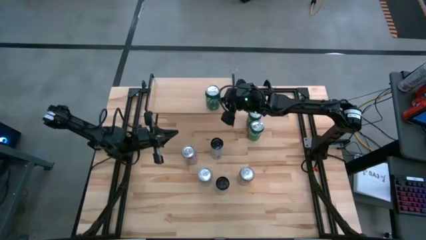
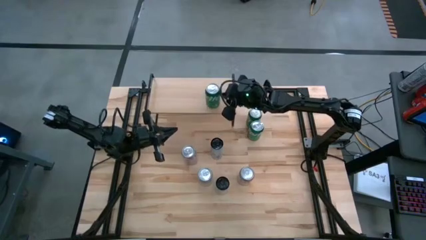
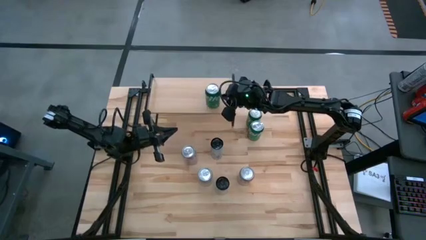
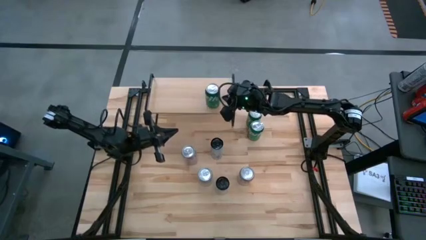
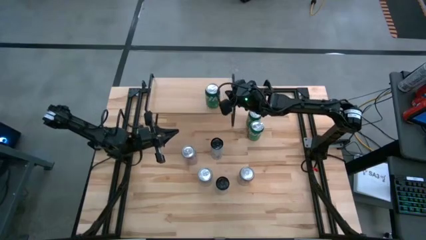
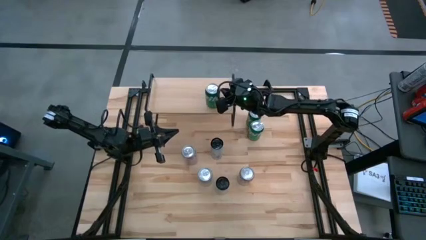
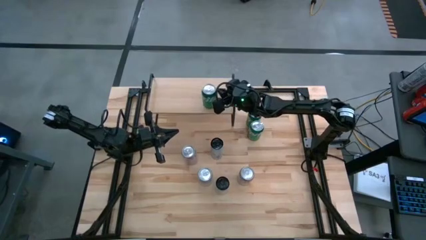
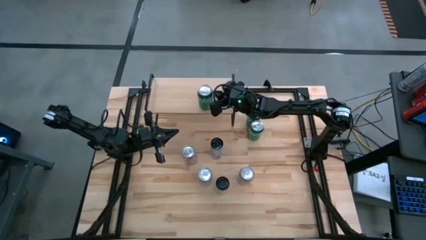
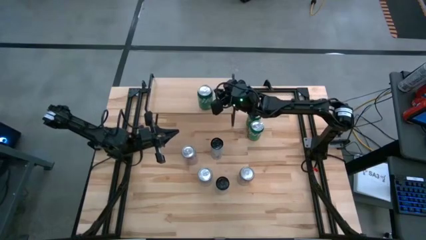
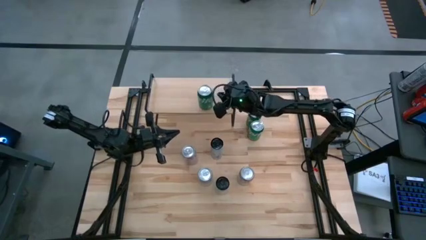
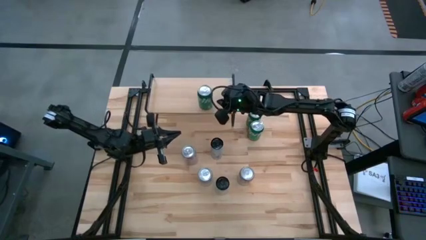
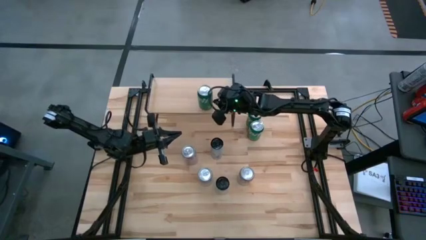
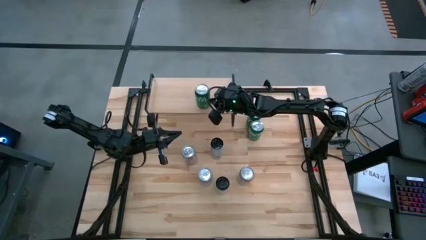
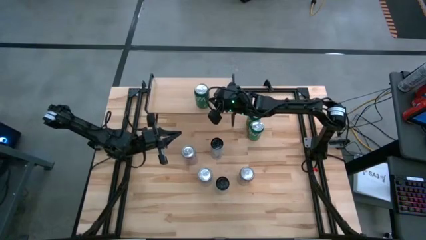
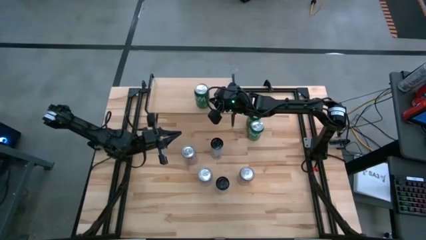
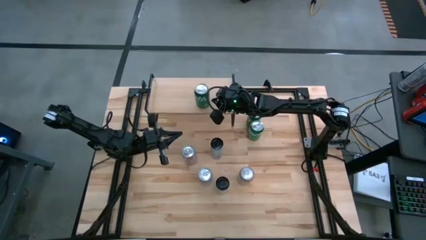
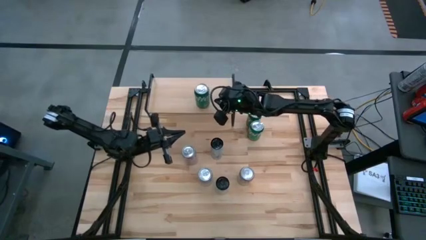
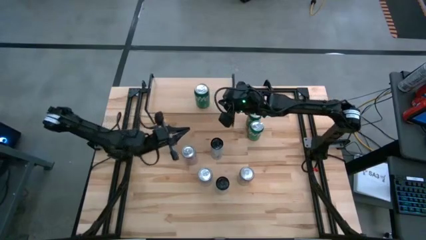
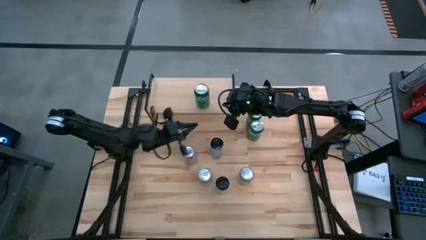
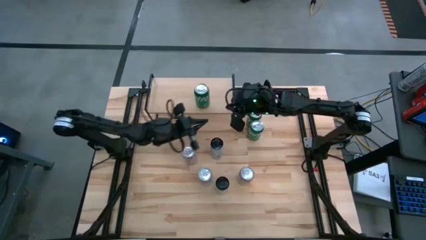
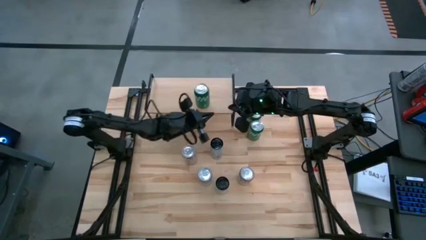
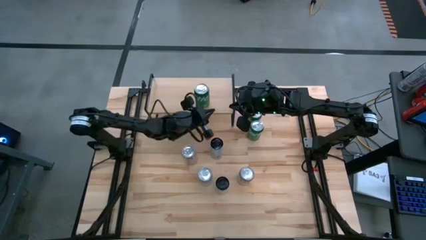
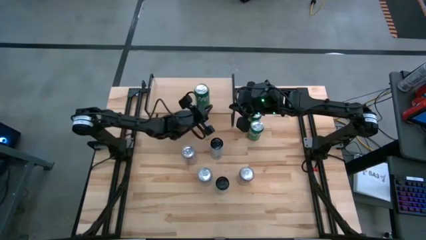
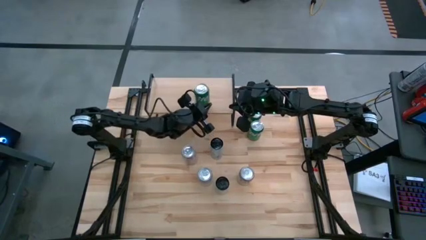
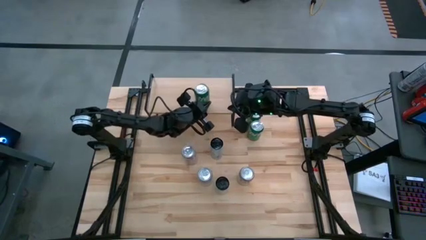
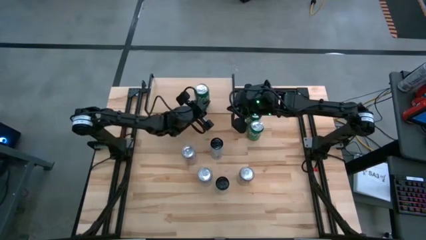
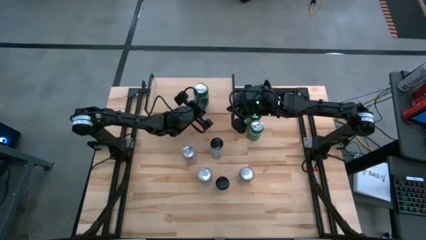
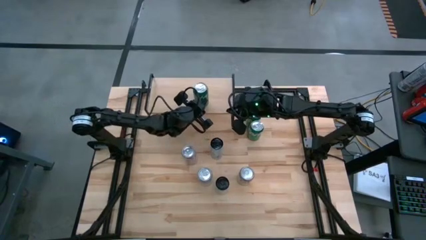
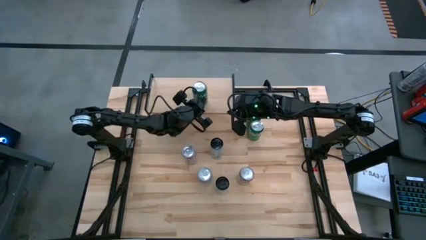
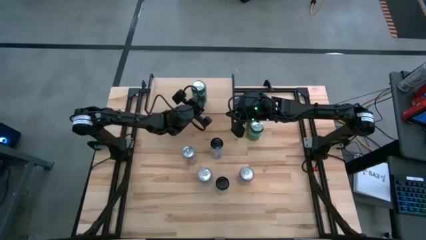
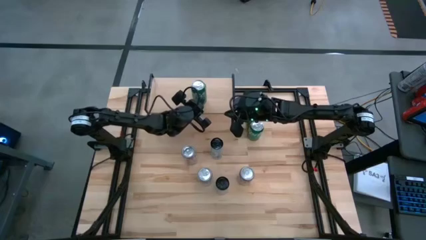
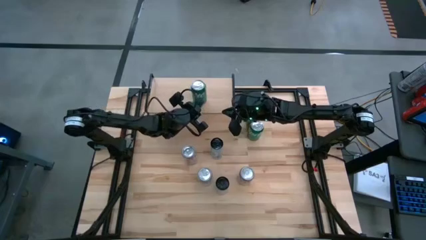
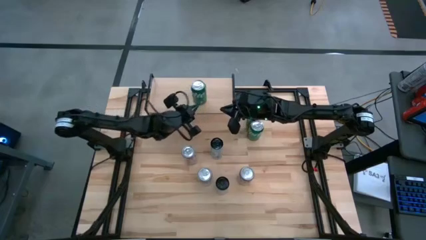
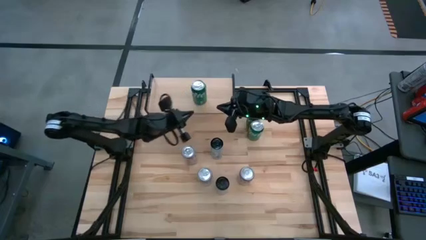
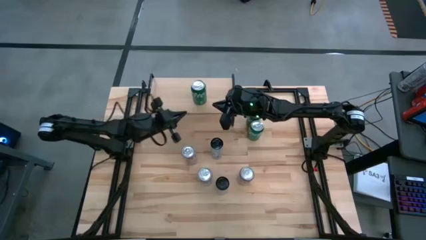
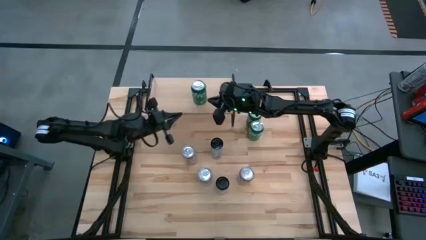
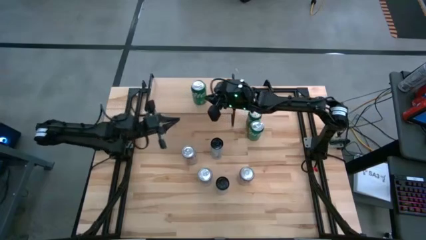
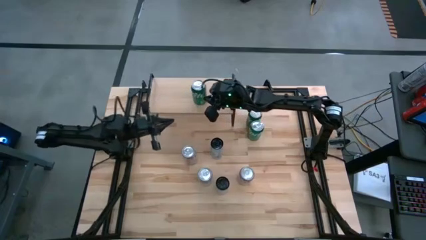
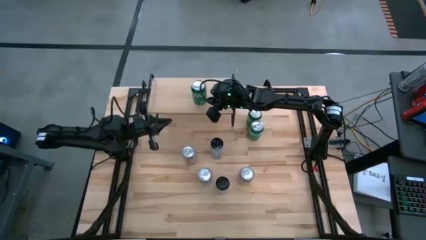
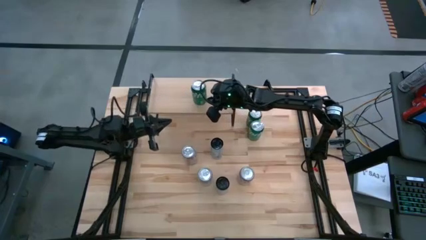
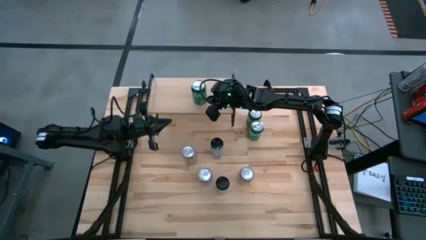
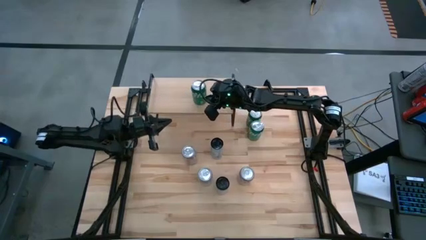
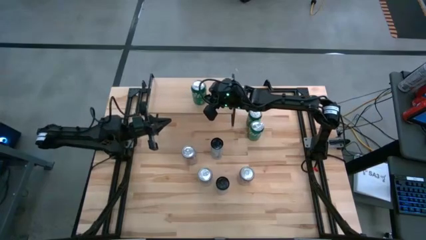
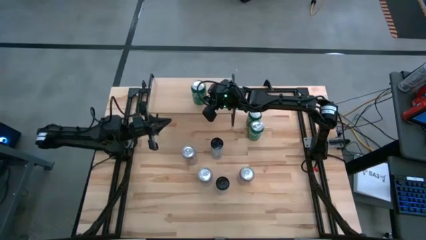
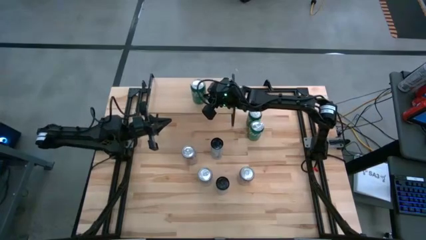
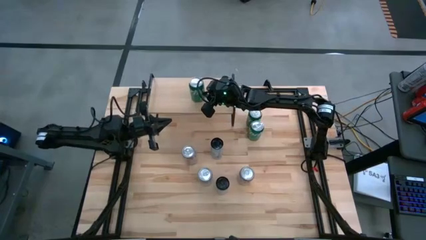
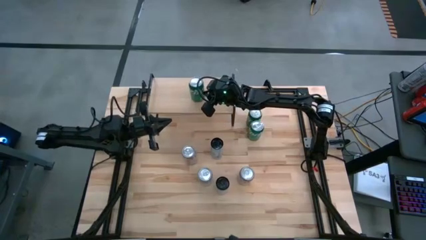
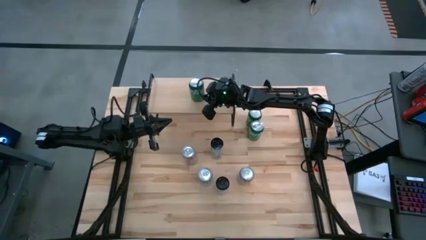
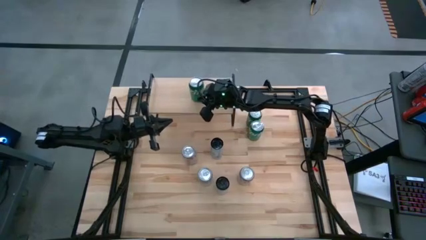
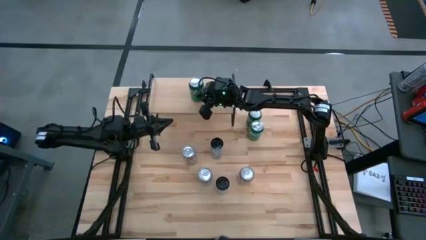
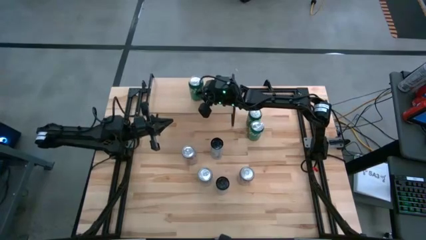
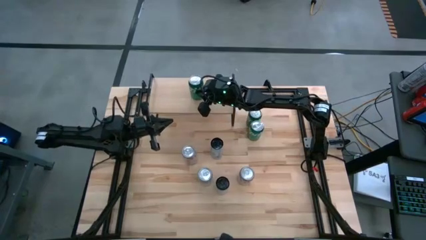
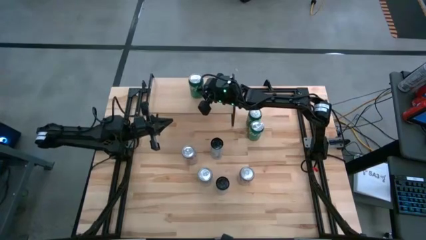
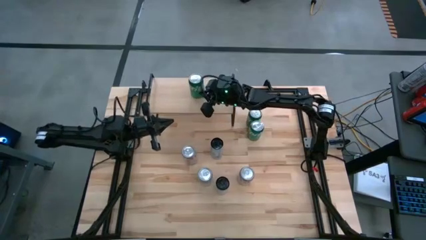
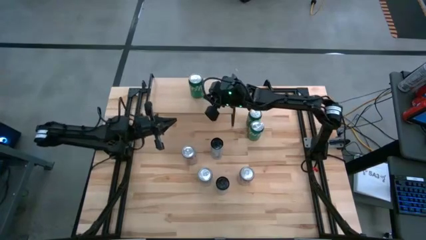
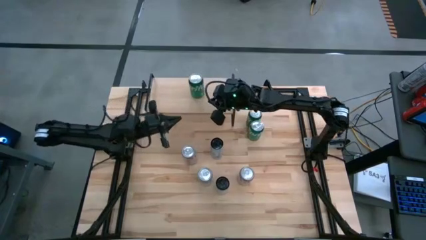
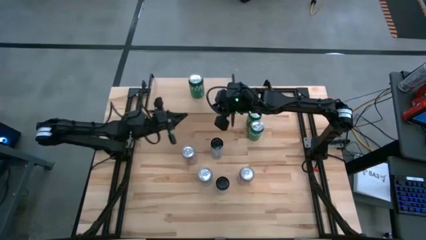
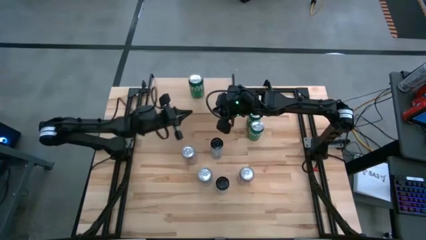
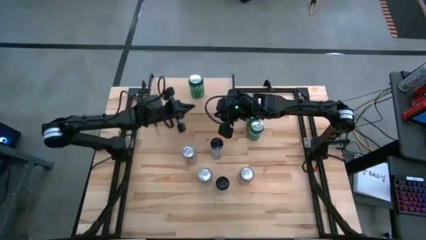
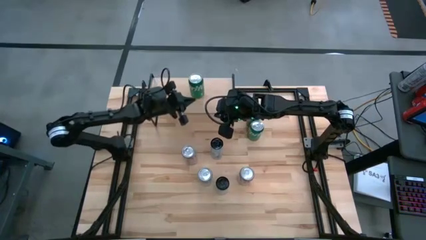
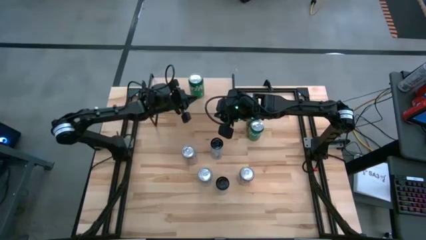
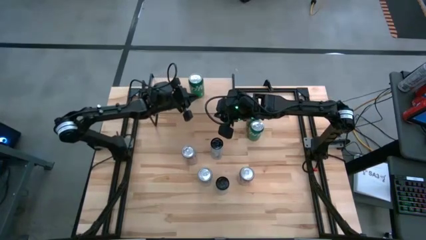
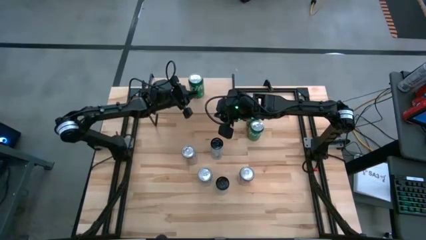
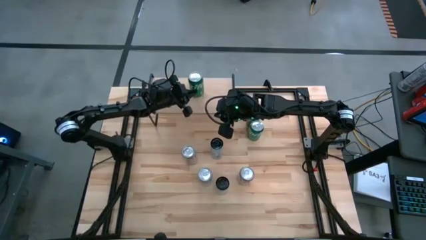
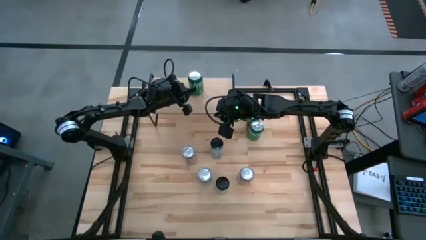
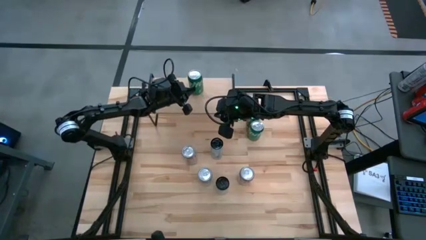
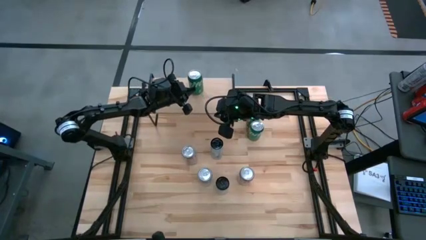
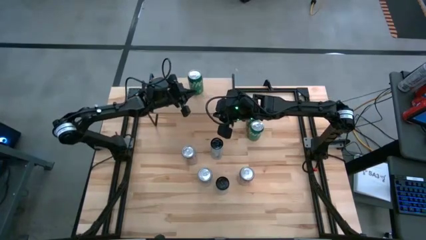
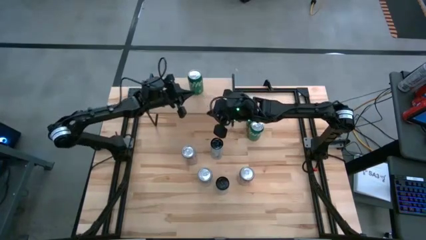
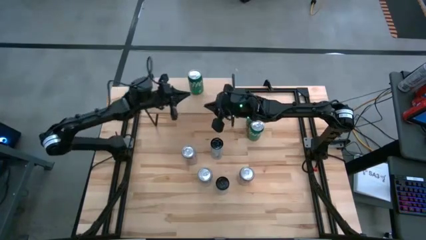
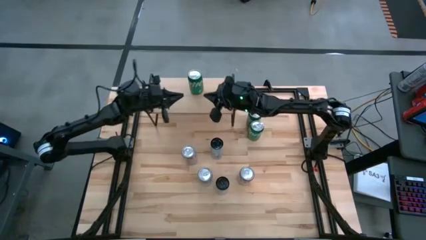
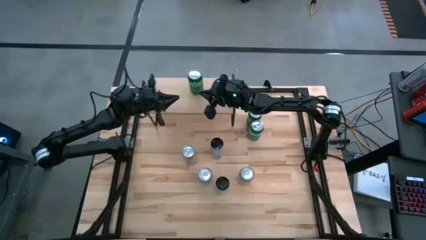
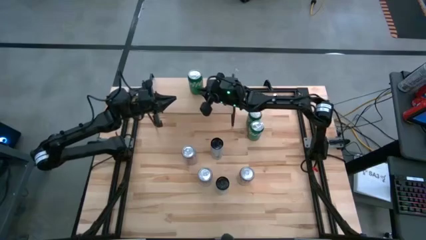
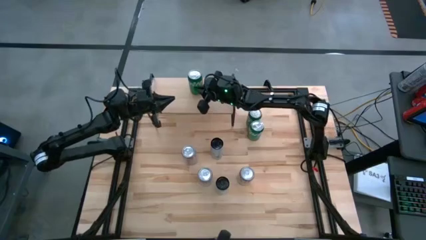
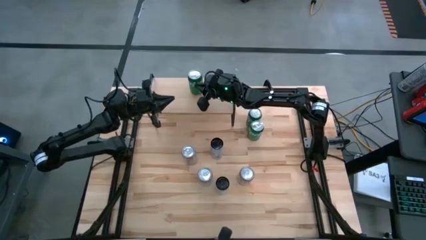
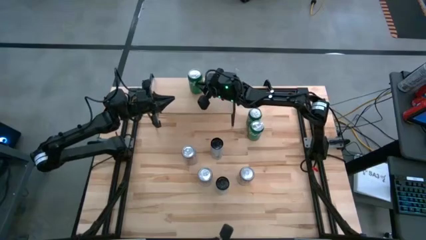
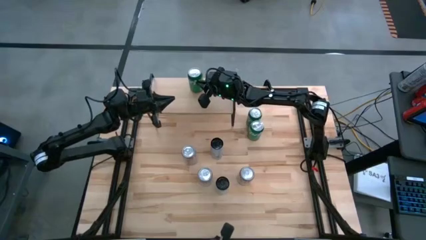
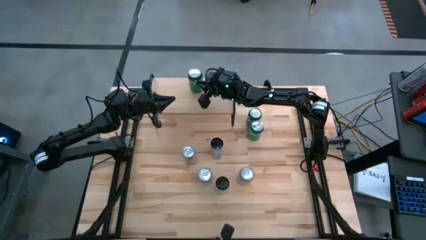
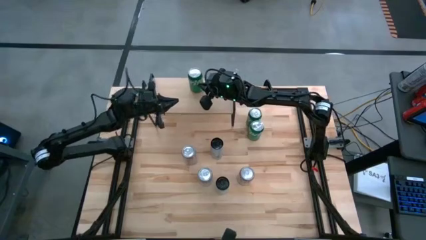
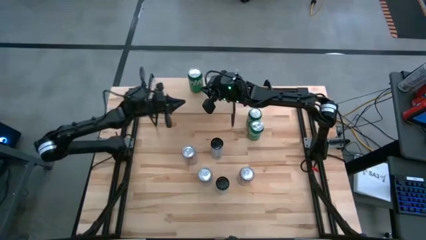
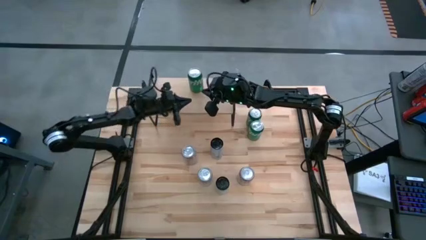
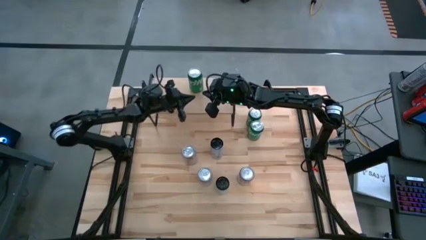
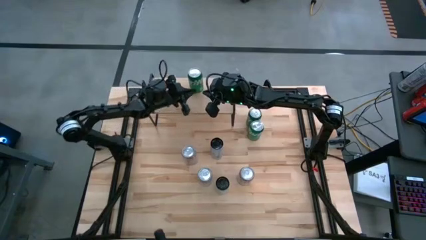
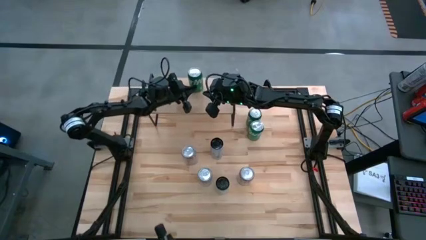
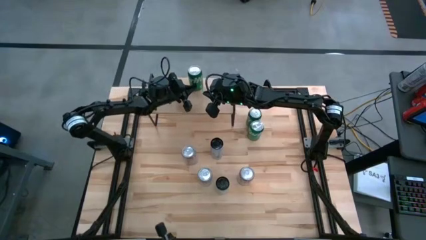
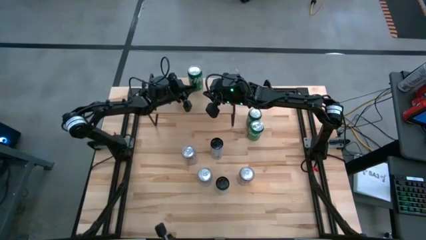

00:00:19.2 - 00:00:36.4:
Task: Place canned beverage on shelf
Put the bottom green soda can on the shelf
